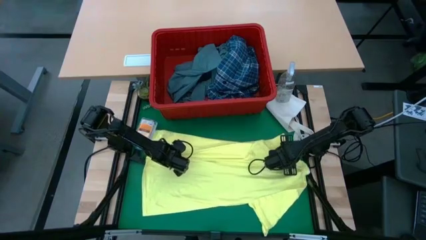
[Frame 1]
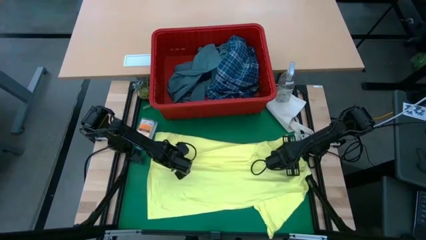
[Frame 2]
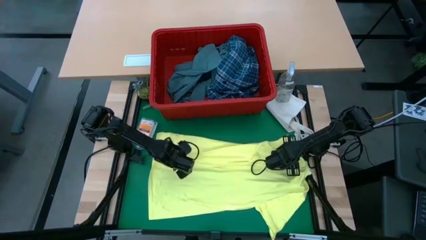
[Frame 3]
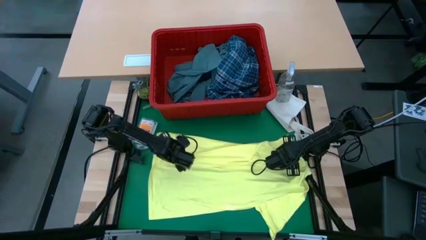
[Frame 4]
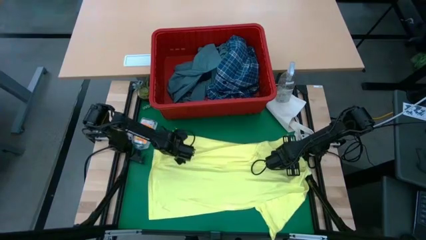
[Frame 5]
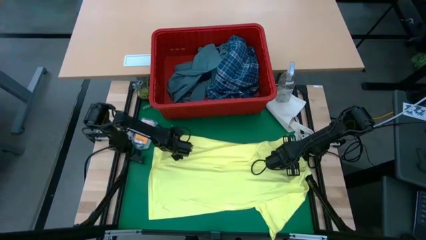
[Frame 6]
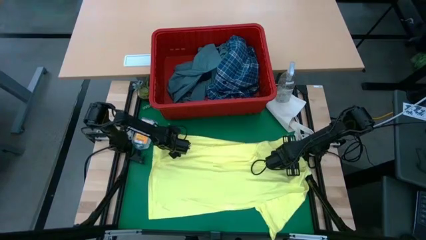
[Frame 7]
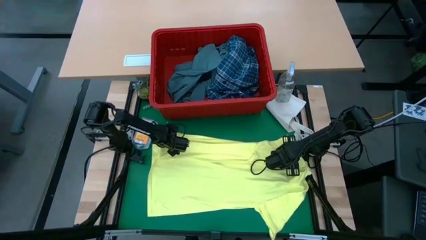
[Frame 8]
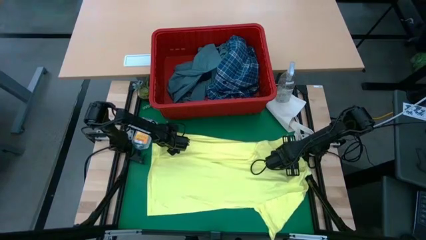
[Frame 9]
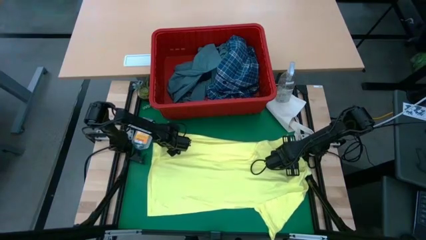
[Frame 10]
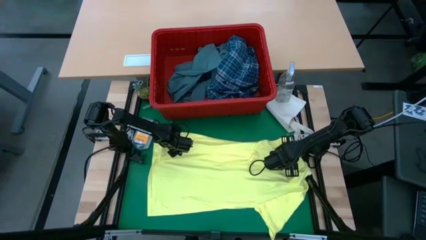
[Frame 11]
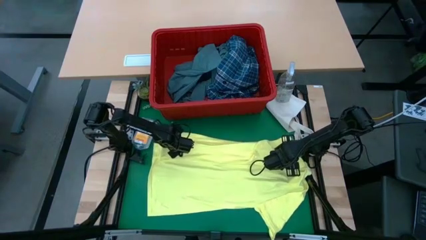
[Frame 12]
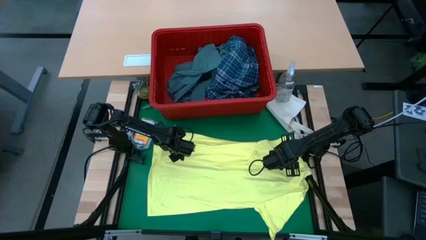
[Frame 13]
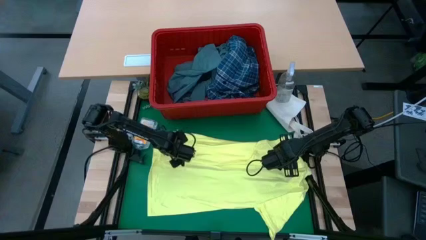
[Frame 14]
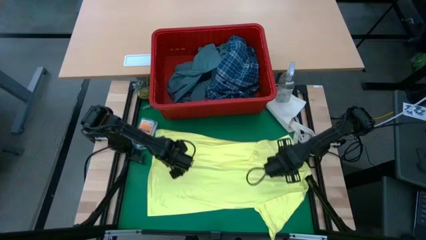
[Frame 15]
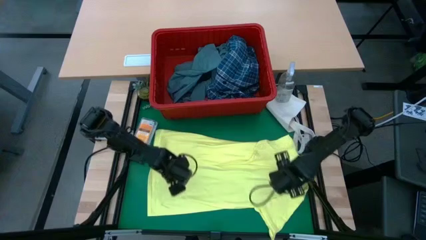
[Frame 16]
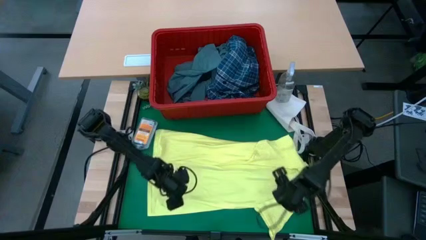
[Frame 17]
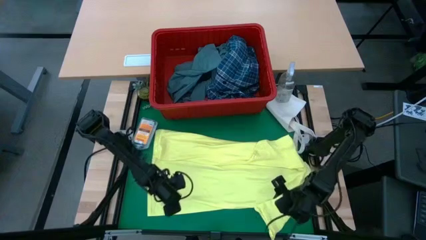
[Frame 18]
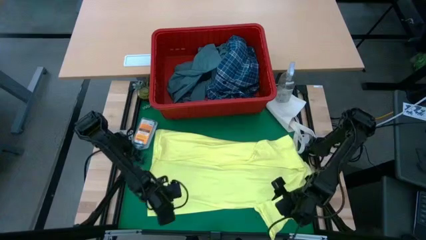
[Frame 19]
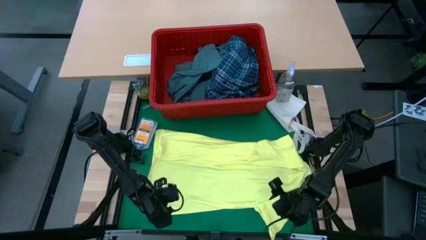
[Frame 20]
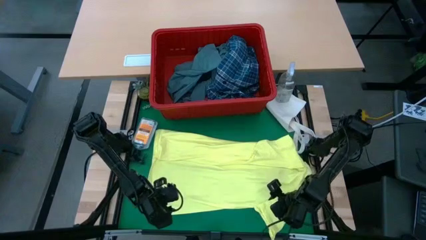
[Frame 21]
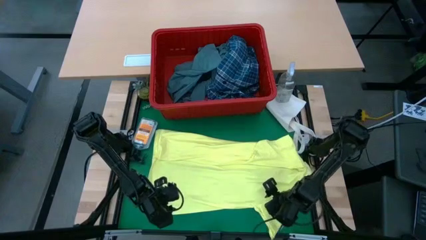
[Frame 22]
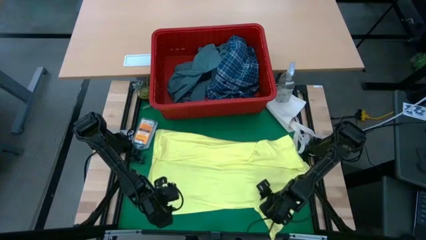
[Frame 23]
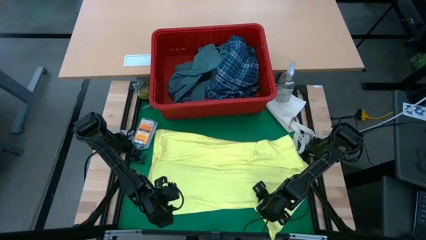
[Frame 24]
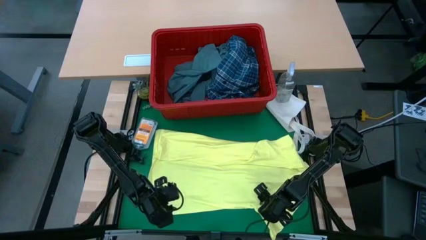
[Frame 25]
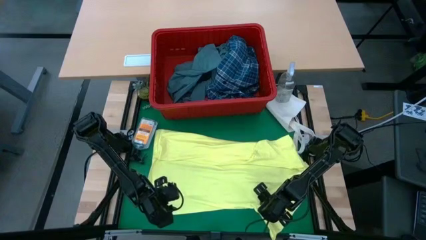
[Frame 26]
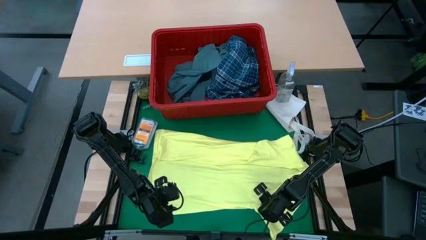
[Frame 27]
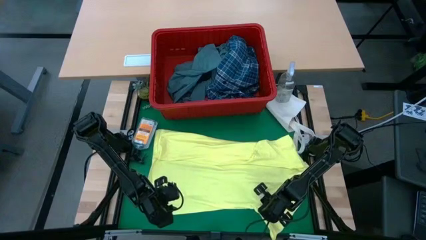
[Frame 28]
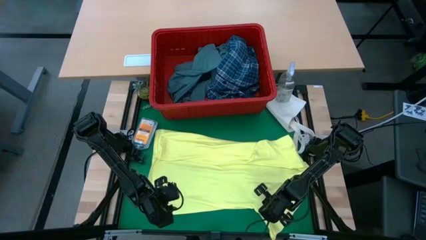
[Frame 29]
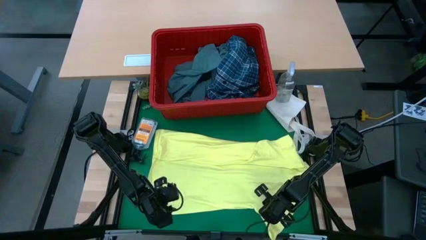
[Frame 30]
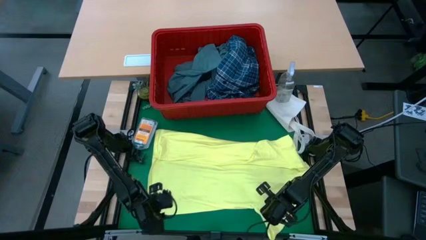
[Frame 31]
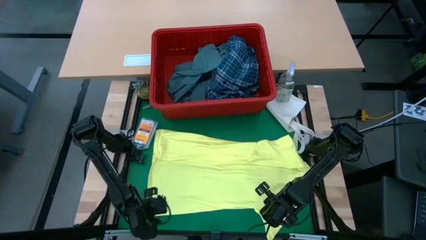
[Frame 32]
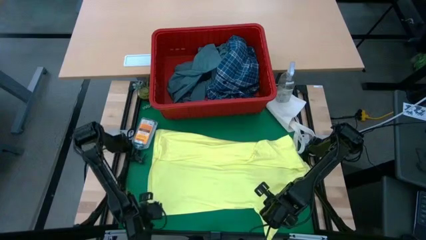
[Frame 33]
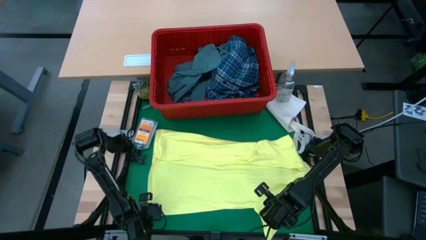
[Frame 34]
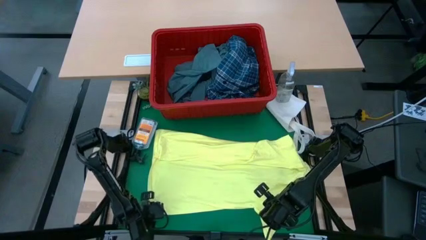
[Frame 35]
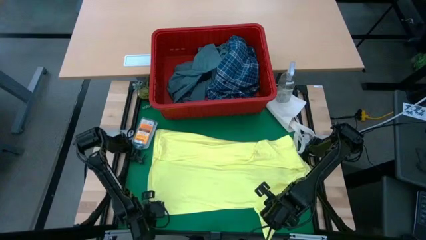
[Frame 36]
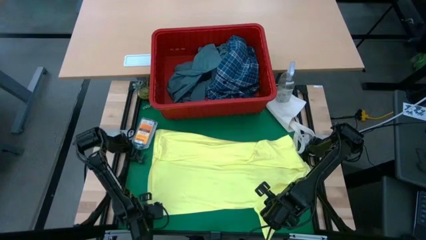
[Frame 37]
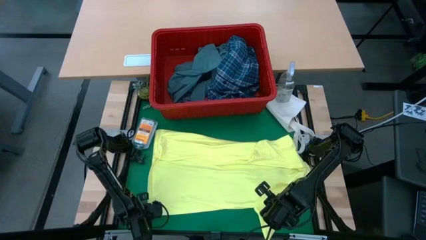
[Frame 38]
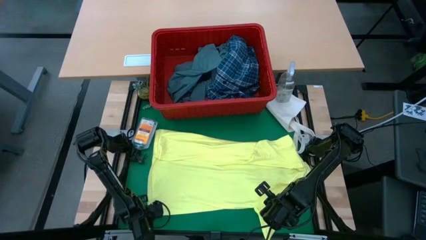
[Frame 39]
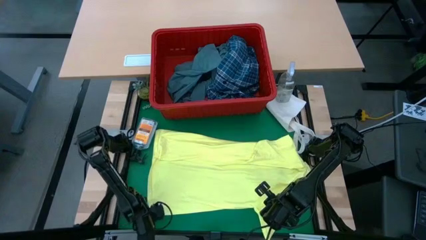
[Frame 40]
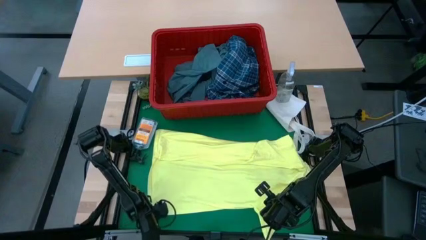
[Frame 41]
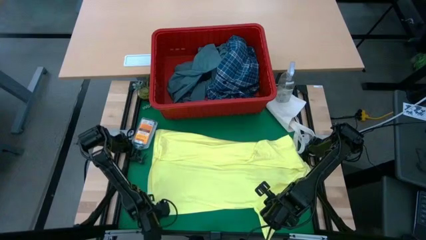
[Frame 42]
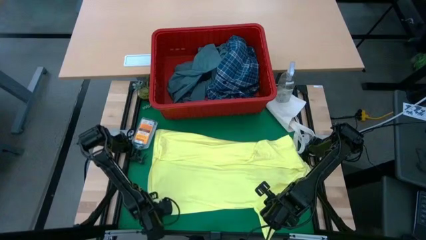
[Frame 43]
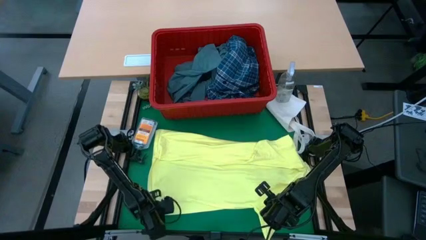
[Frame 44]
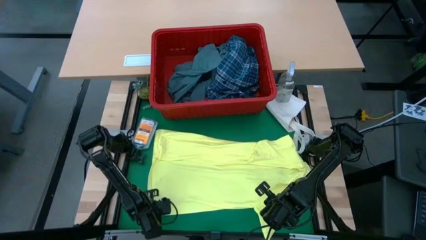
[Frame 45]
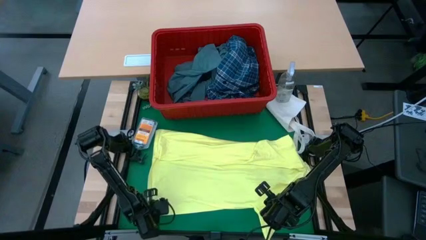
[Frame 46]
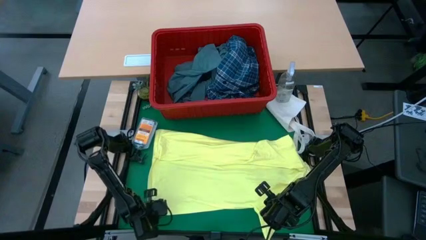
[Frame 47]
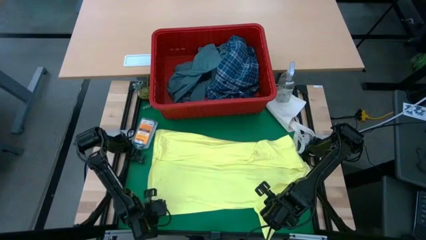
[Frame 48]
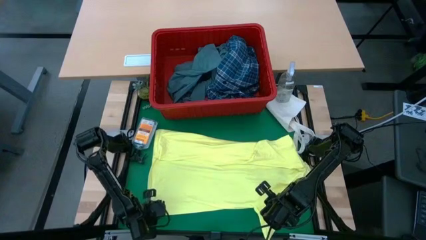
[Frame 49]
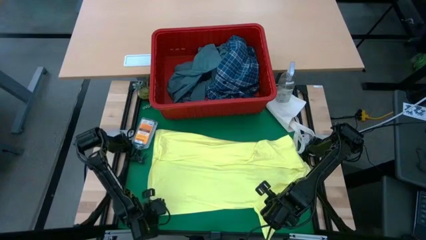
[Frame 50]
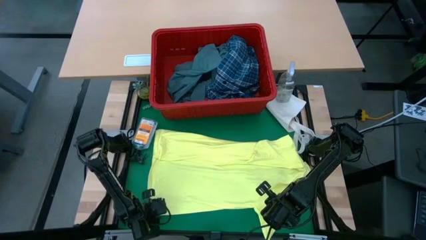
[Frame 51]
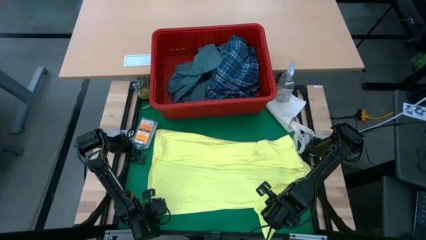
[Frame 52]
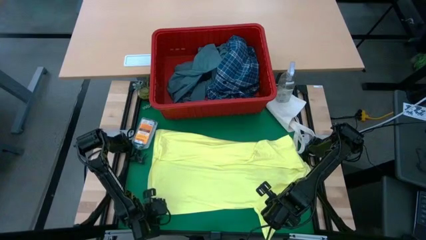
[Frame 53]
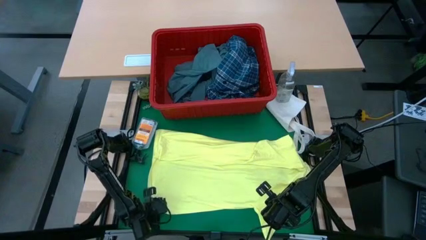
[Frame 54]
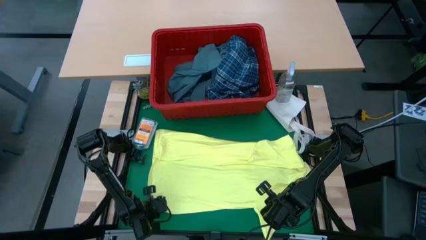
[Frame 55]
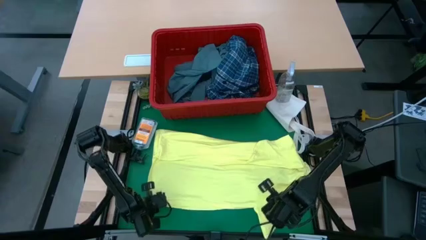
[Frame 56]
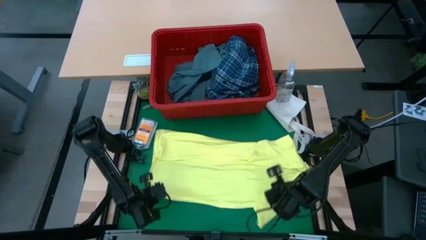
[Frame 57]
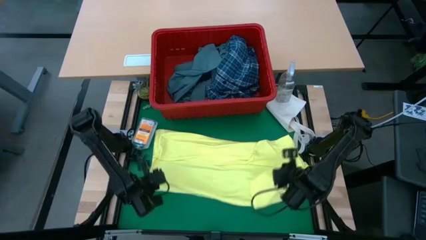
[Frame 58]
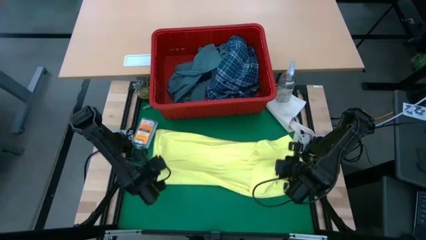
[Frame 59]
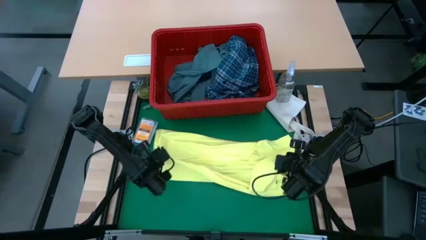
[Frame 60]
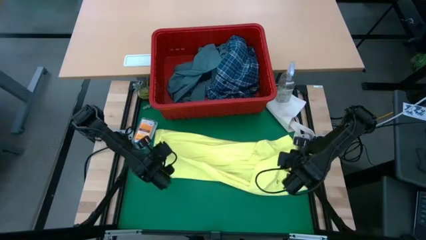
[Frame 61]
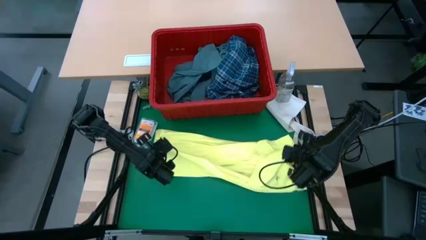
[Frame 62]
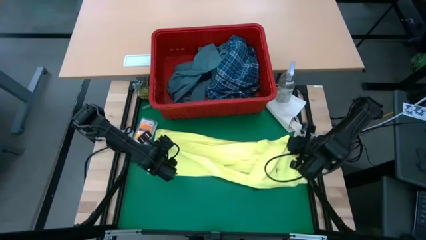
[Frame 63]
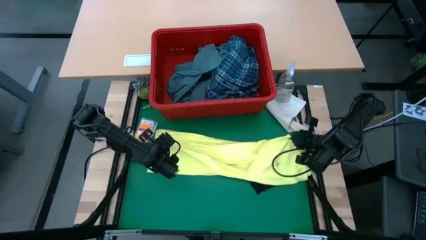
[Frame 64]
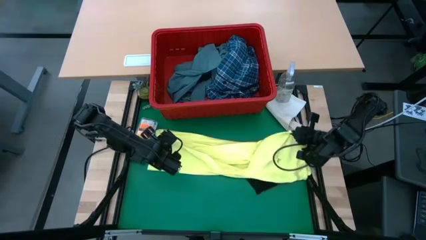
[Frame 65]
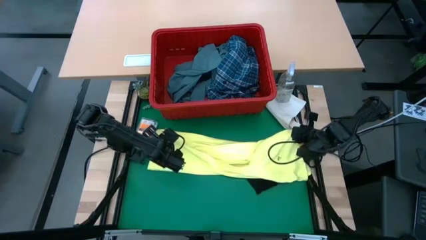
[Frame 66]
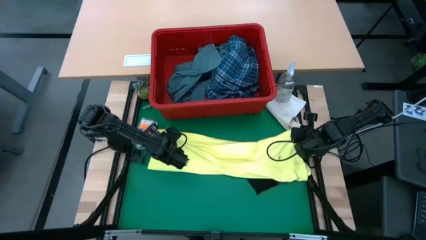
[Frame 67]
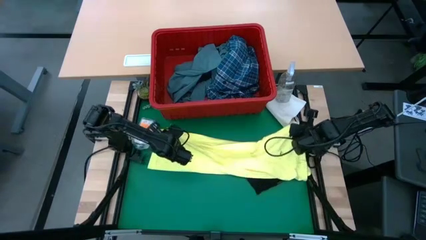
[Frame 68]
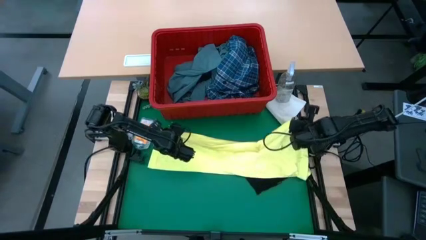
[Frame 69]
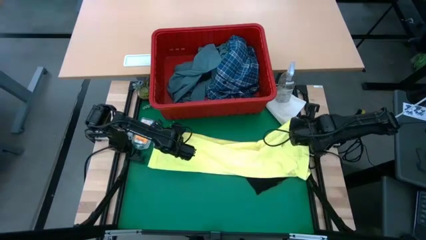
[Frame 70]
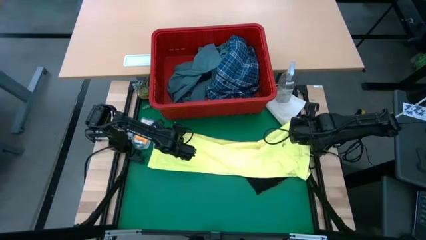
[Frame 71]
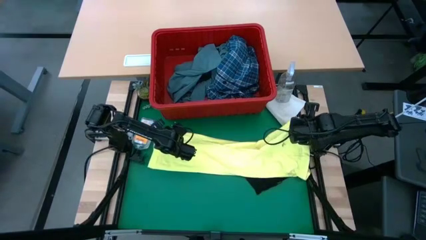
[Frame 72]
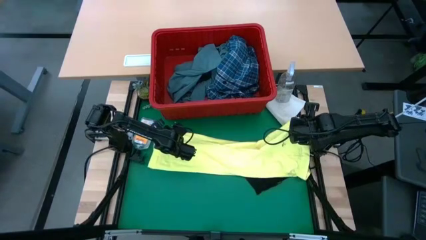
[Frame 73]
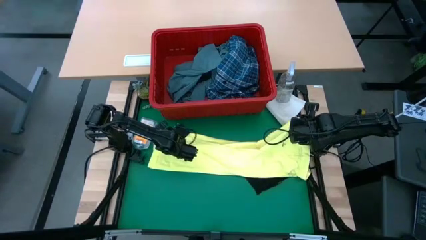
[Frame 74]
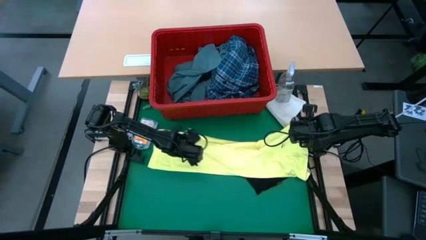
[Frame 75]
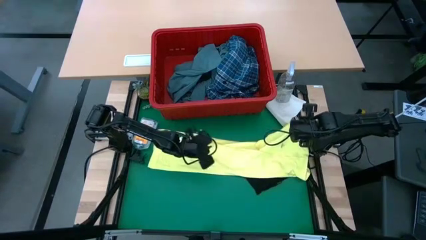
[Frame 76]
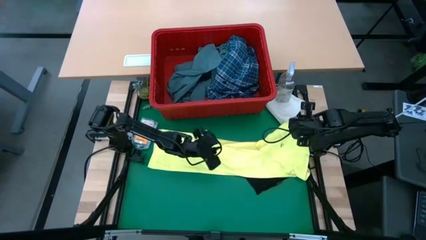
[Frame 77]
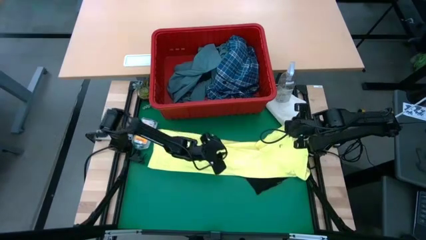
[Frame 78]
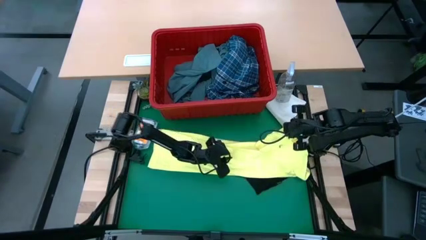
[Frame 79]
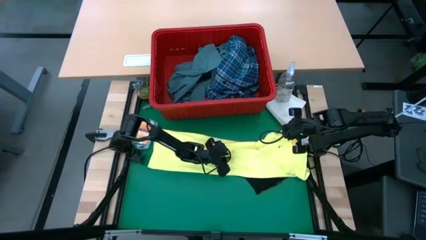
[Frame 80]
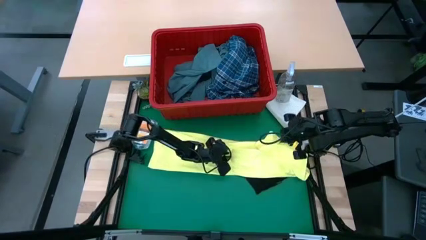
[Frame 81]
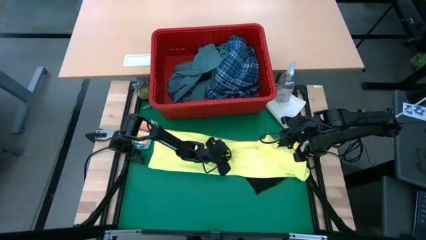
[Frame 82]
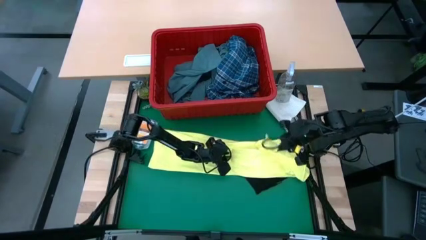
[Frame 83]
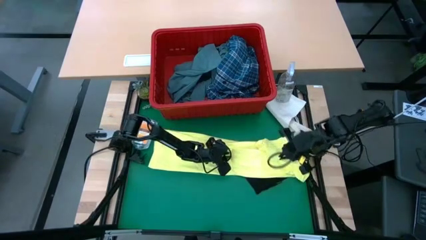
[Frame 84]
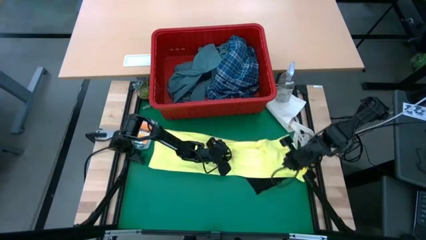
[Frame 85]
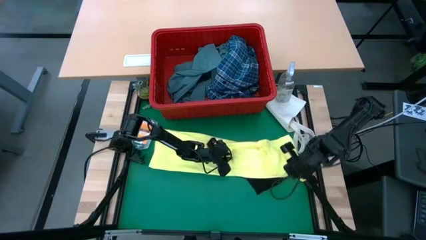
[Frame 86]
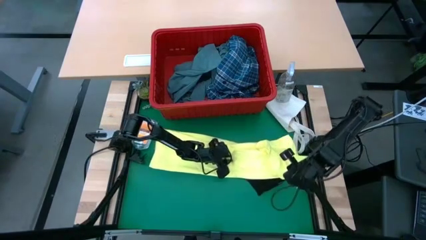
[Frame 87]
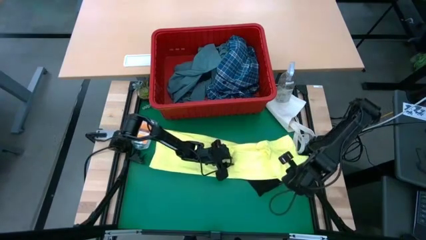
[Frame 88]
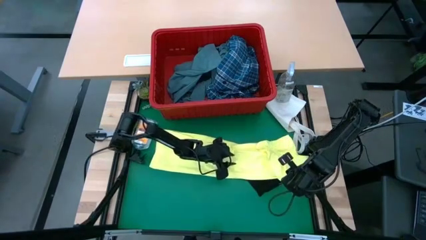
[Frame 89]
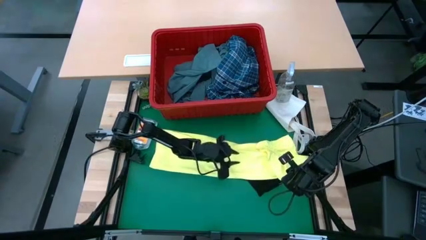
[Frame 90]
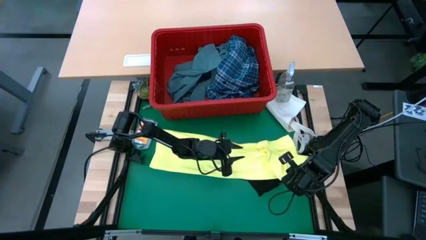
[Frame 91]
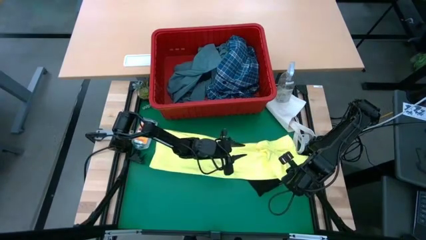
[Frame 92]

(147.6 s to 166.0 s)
Task: Fold Laundry from Bin
Fold the yellow shirt
